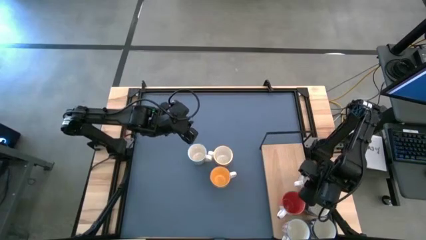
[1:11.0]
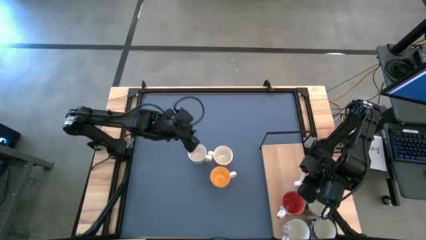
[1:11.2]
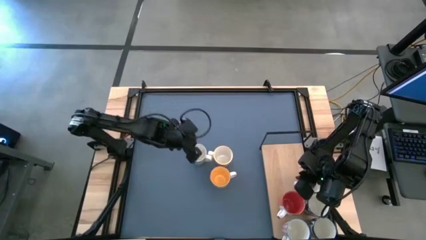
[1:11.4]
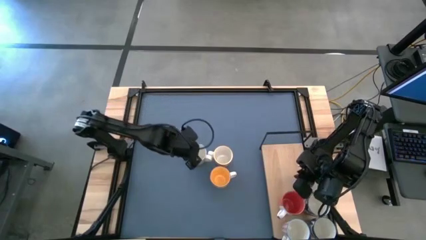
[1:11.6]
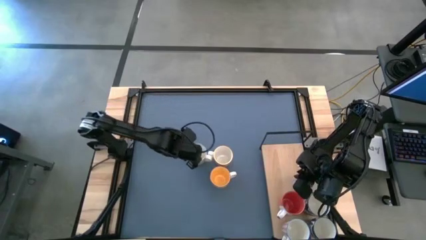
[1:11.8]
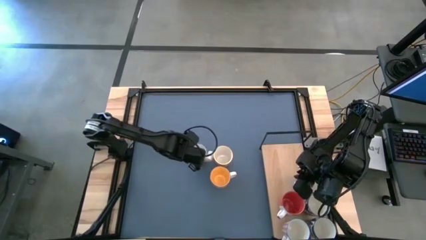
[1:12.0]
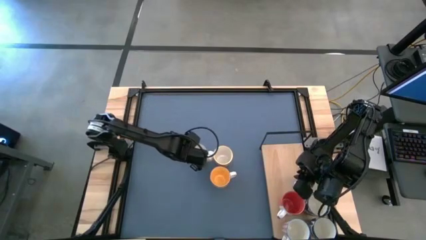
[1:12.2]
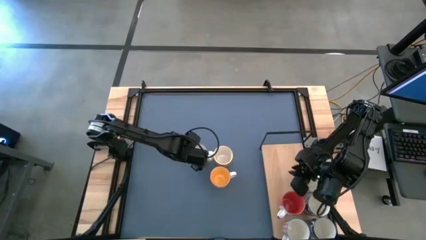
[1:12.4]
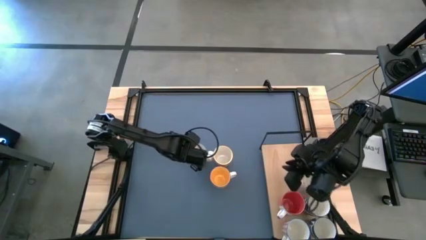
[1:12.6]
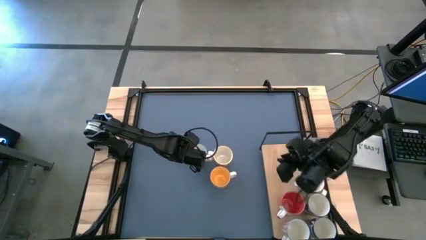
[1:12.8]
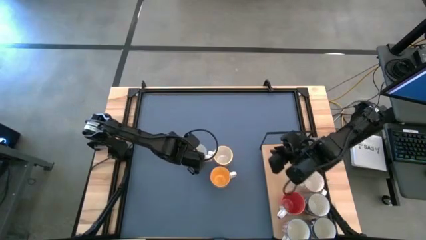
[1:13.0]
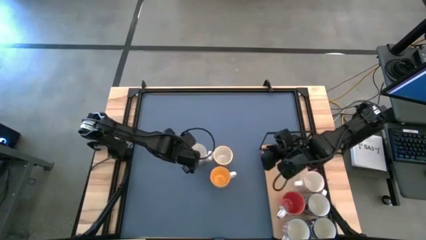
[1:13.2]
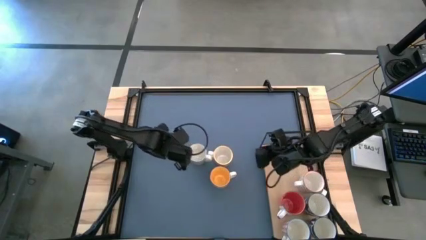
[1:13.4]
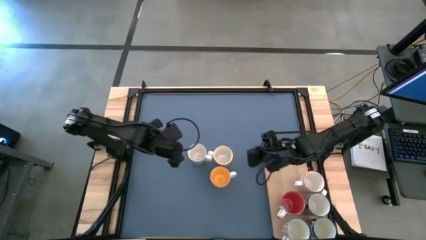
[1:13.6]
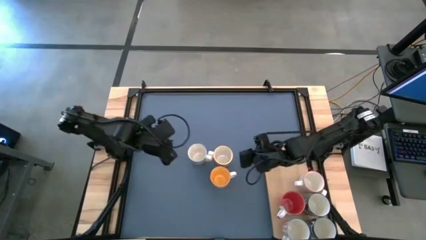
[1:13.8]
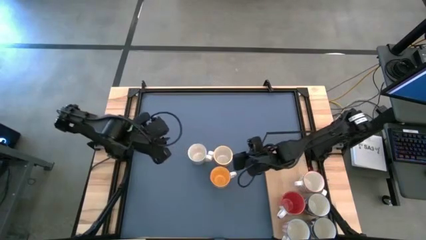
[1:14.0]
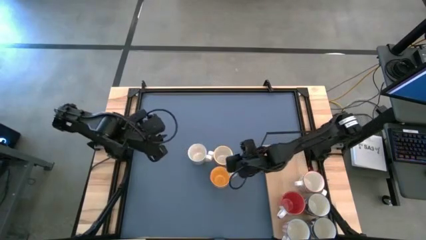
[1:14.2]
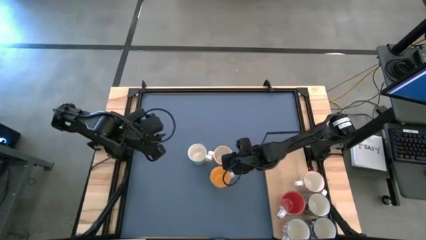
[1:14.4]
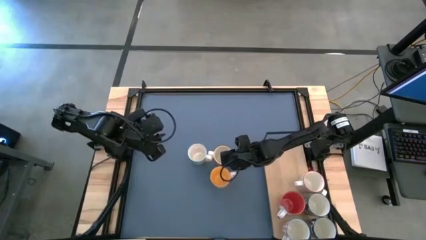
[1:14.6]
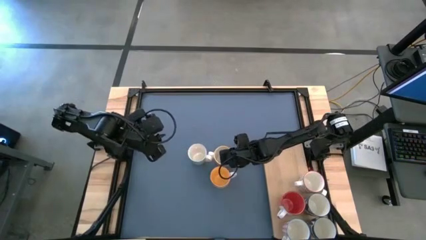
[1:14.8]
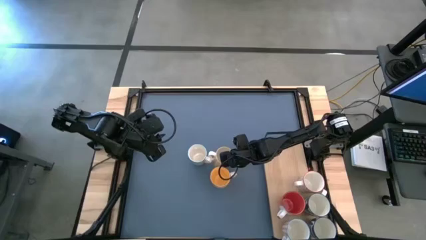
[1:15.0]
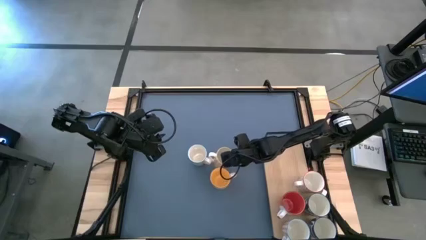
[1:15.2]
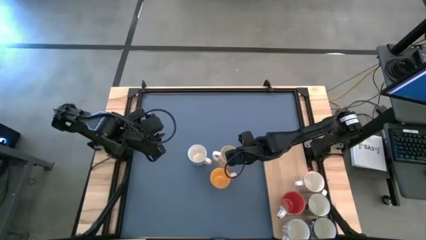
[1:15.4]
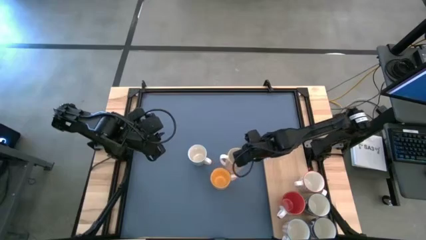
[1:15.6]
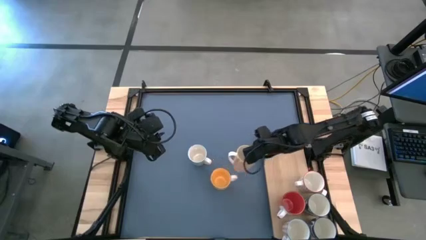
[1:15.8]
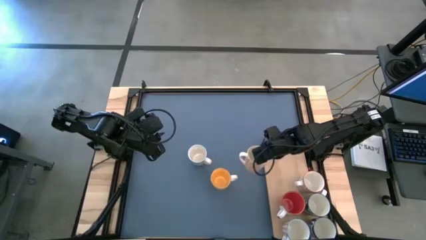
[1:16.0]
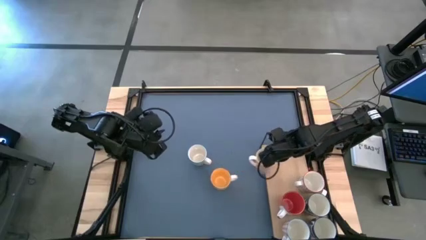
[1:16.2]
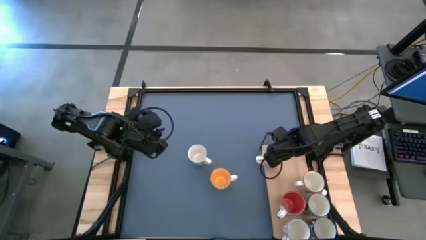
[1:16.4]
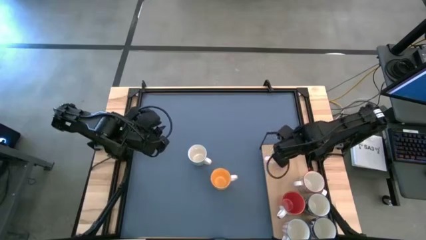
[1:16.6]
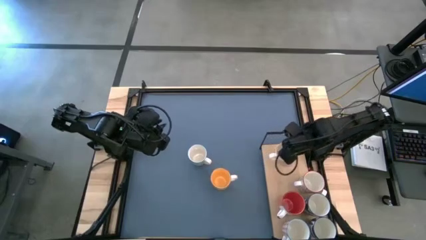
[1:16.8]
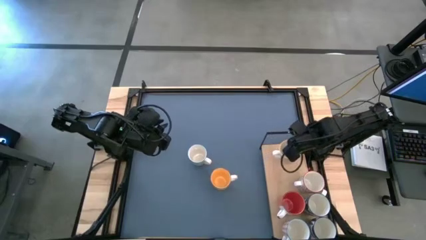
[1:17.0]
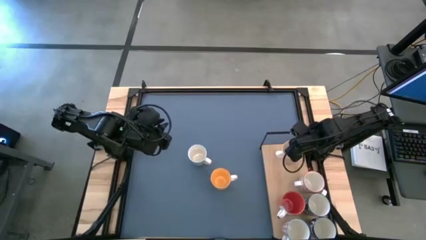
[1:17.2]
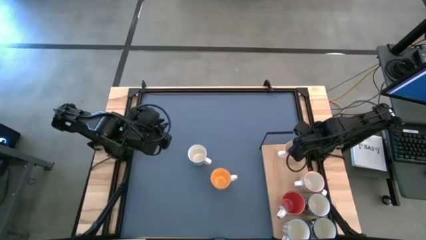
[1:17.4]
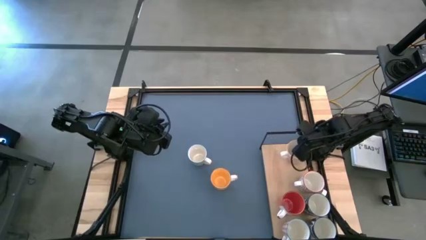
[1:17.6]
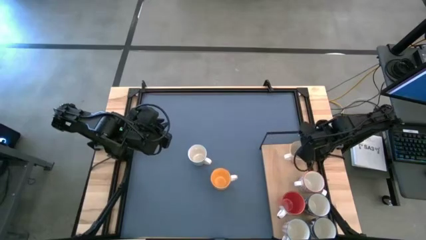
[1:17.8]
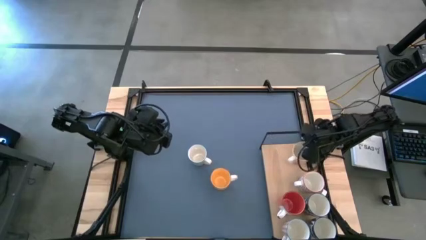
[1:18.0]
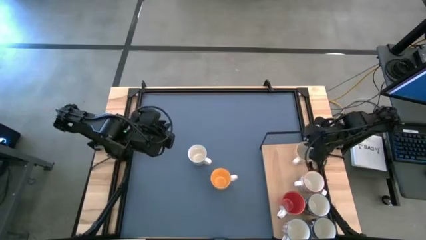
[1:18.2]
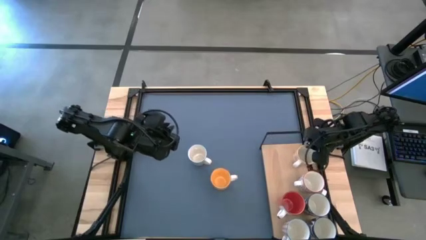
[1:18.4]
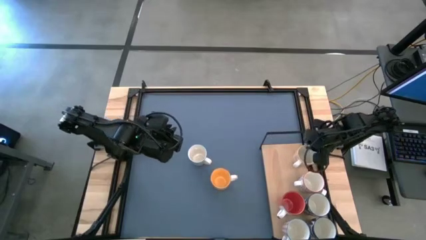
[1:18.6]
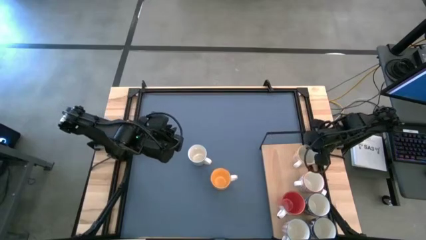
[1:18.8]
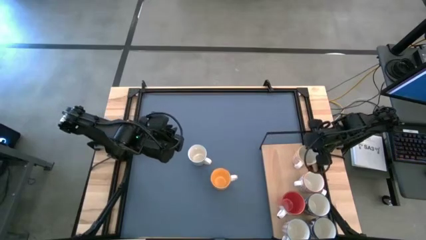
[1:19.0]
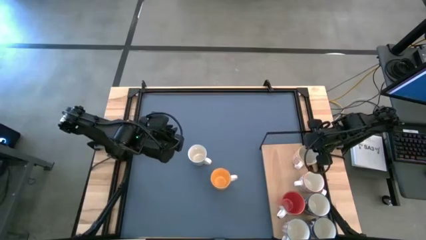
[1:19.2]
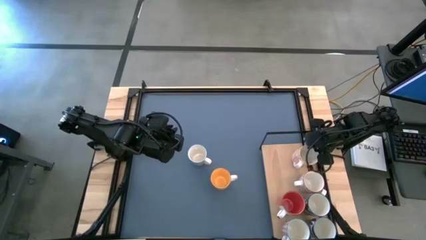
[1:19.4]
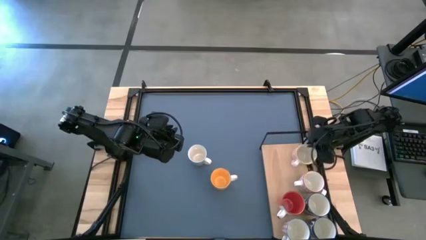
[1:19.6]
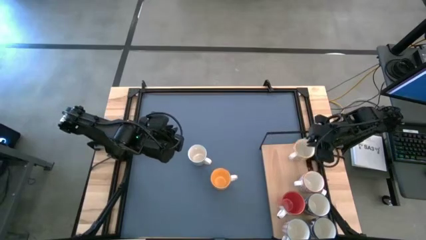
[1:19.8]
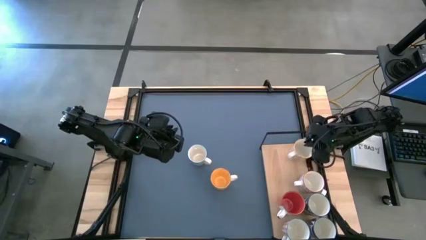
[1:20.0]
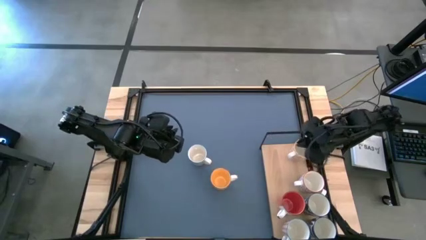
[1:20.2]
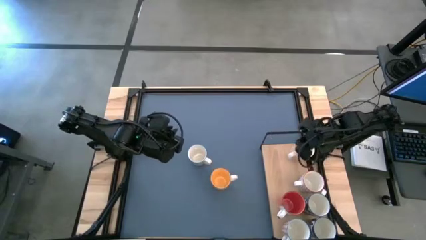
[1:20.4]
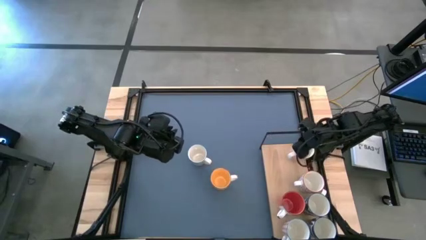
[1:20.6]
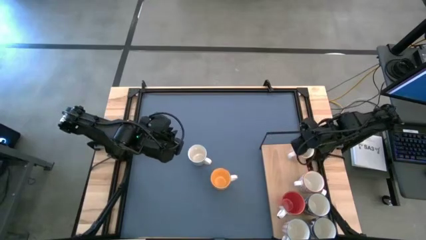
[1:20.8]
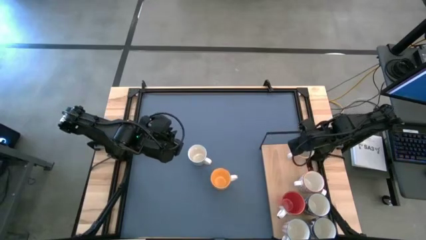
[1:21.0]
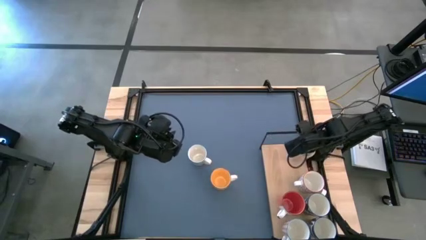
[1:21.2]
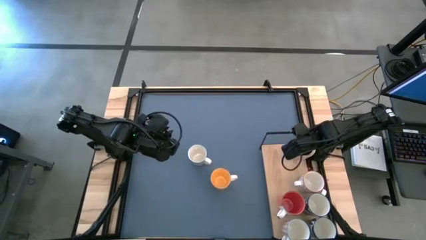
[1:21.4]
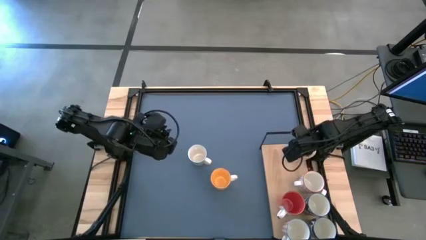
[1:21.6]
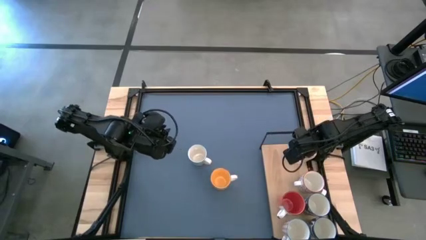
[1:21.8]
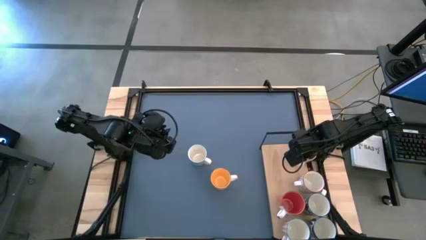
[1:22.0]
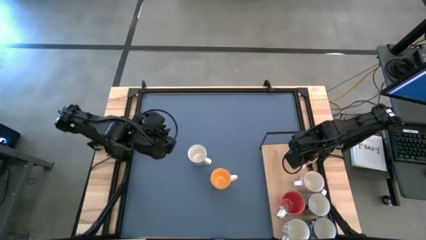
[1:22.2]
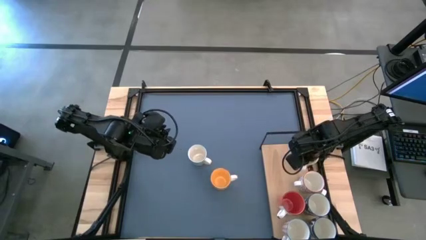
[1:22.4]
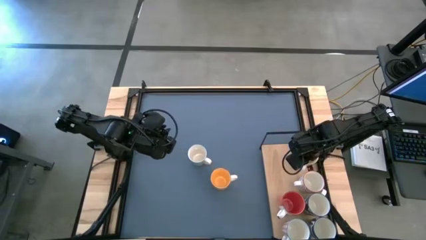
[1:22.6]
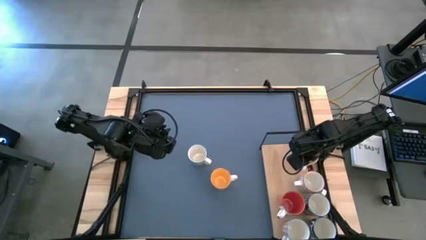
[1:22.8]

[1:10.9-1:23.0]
Task: Place coffee mugs
Put the orange pattern mug on the shelf

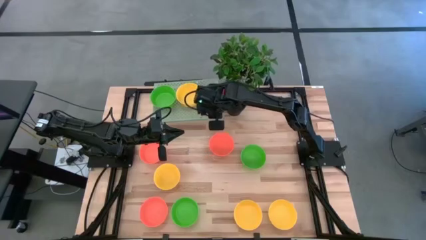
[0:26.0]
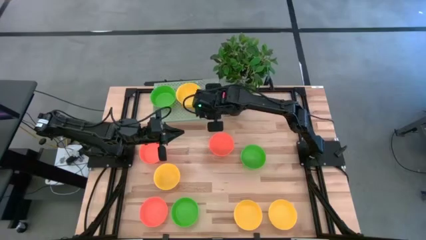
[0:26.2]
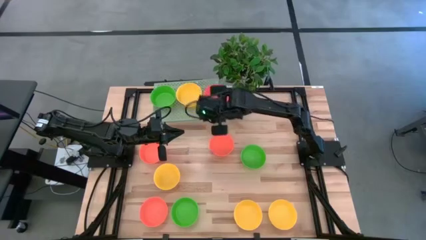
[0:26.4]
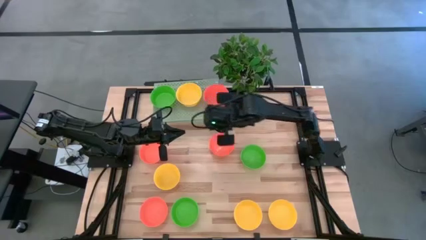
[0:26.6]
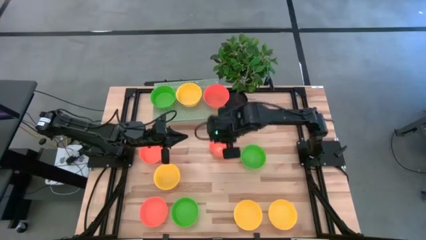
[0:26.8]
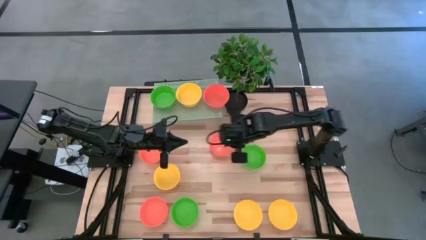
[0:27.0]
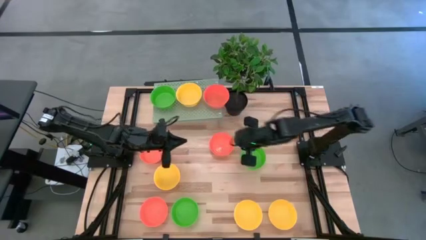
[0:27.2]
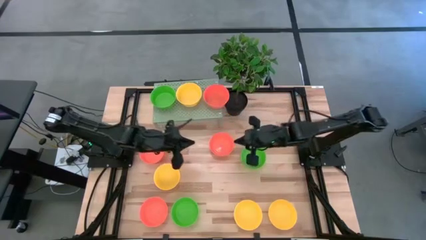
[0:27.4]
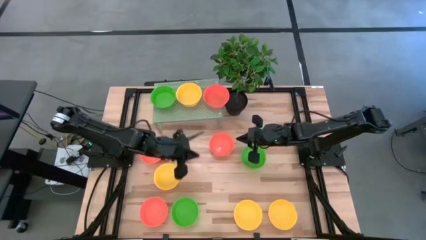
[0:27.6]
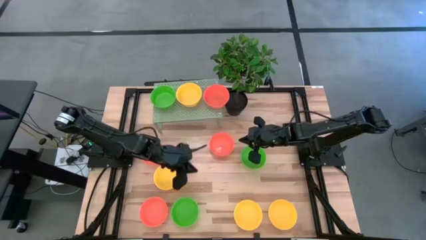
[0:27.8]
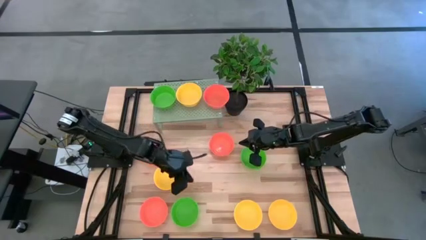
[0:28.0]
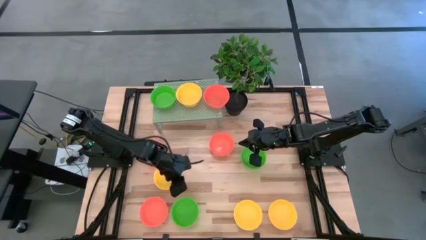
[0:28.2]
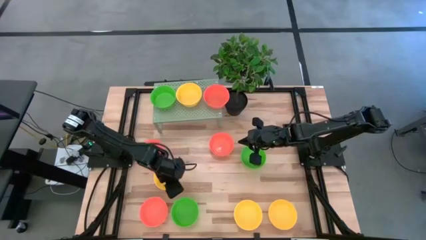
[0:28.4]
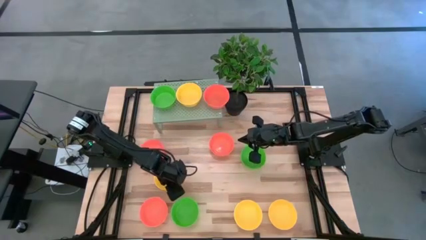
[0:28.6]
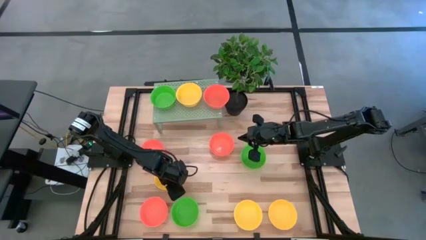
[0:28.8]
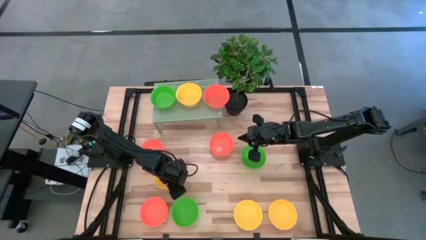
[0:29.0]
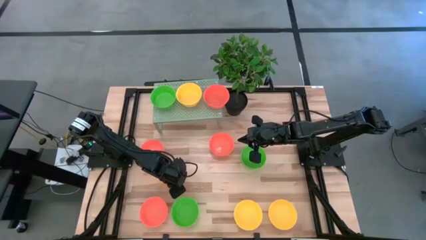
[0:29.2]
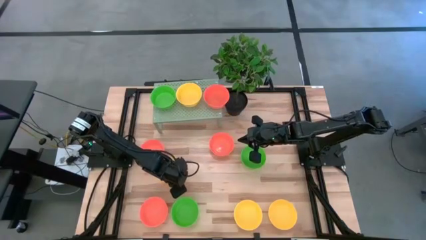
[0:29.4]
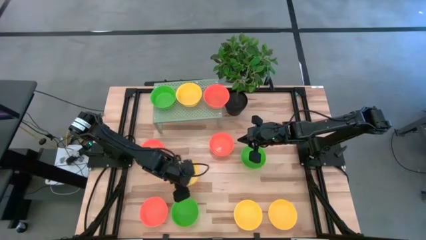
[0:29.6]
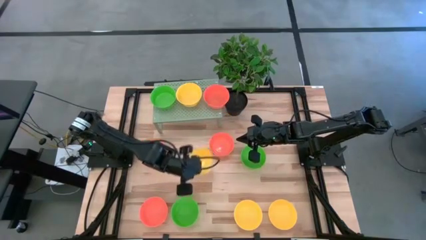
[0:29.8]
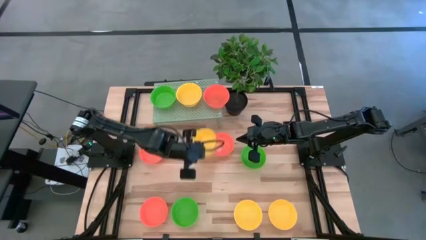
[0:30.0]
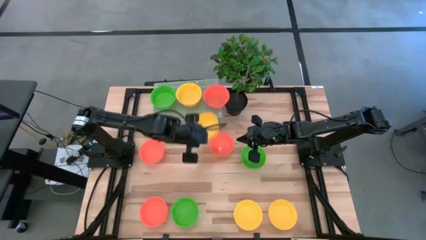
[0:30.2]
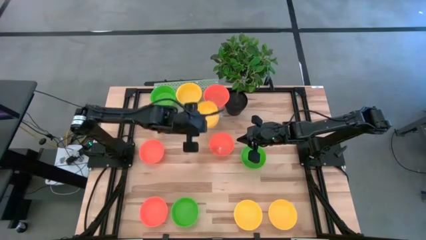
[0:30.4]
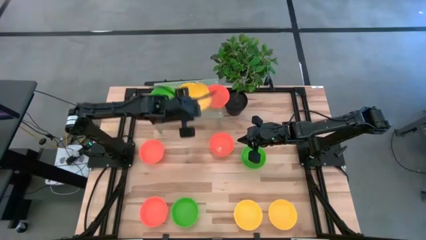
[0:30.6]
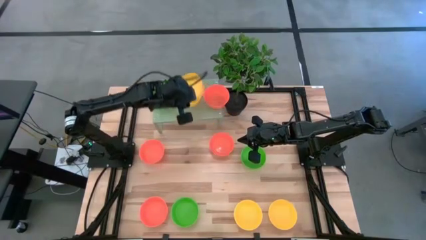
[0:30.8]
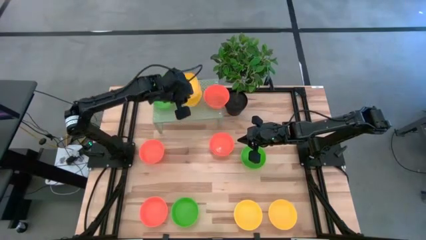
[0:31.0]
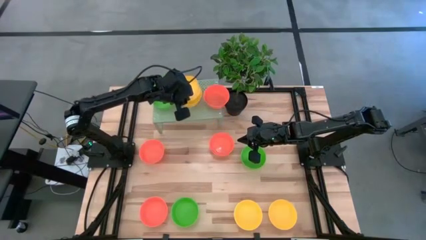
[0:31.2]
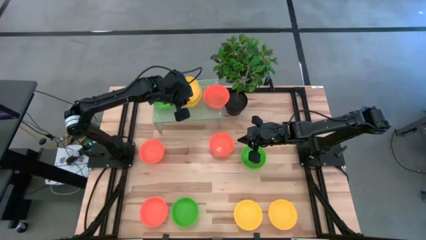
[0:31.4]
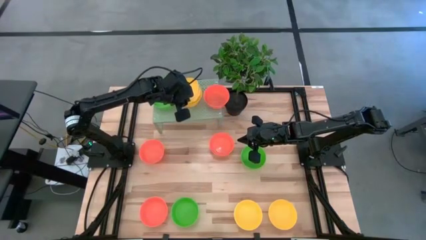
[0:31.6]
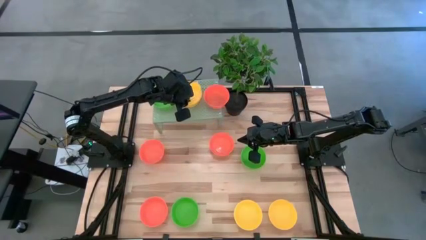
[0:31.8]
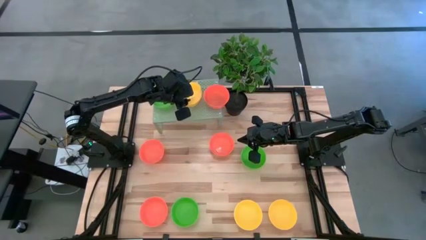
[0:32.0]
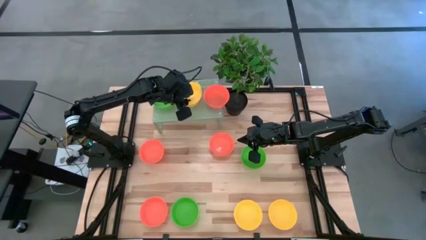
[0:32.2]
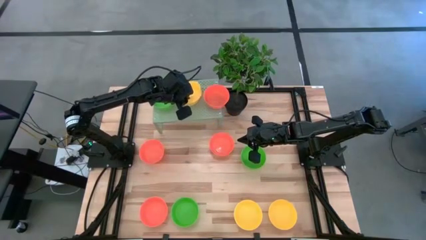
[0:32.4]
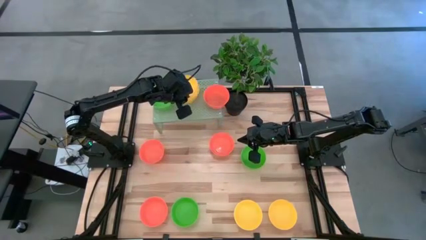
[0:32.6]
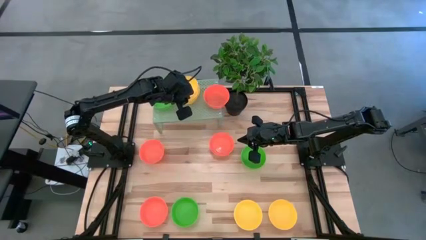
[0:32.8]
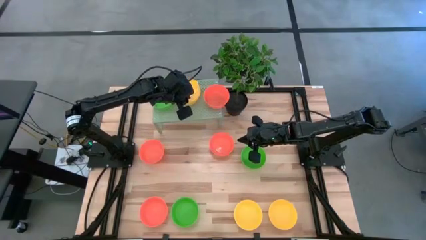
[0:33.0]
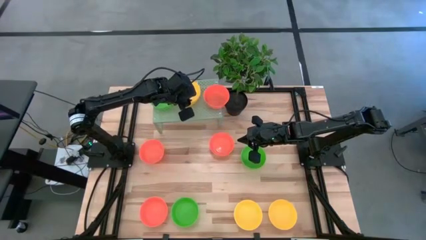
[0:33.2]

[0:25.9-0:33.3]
Task: Pick & Place Mini bowls
Stack the yellow bowl on top of the yellow bowl on the shelf
